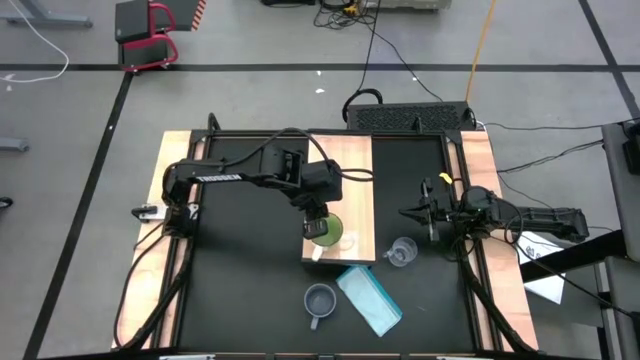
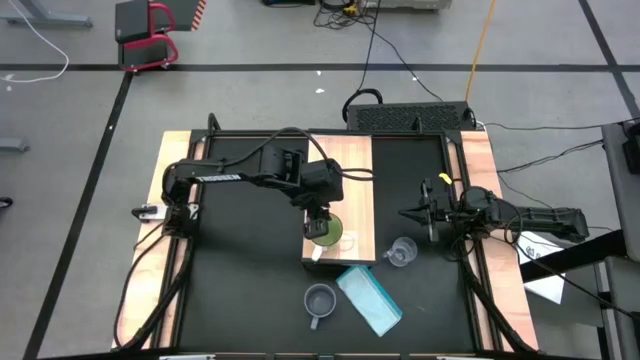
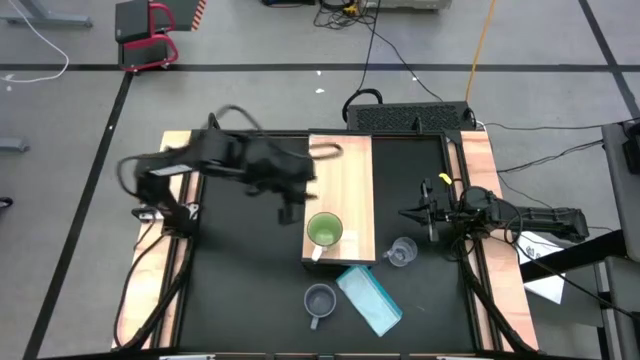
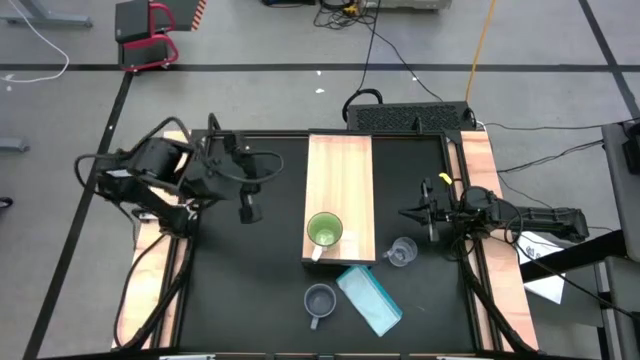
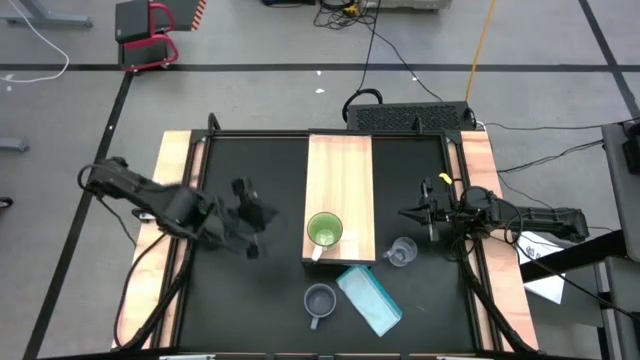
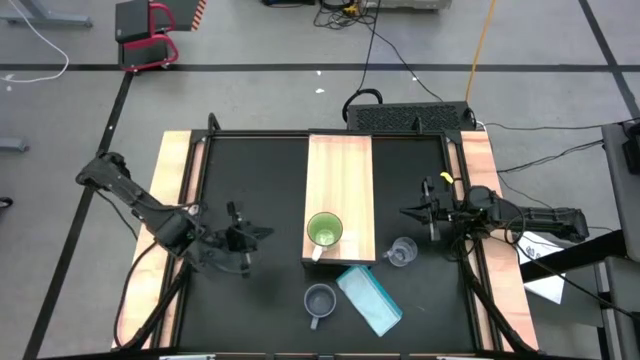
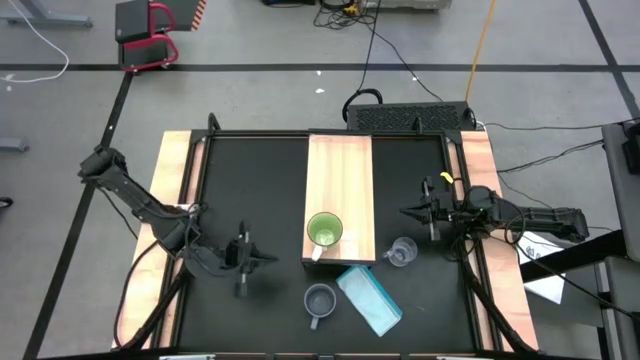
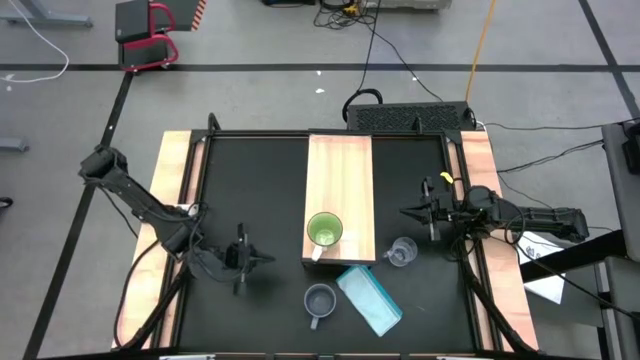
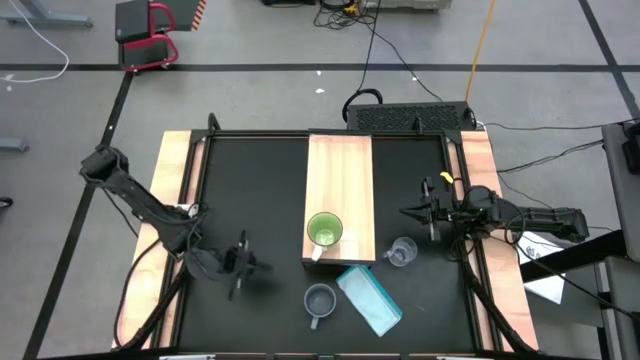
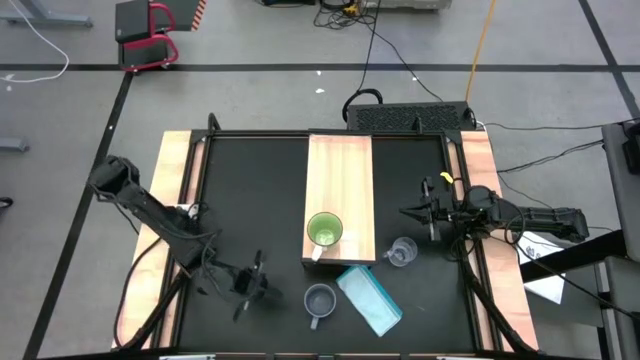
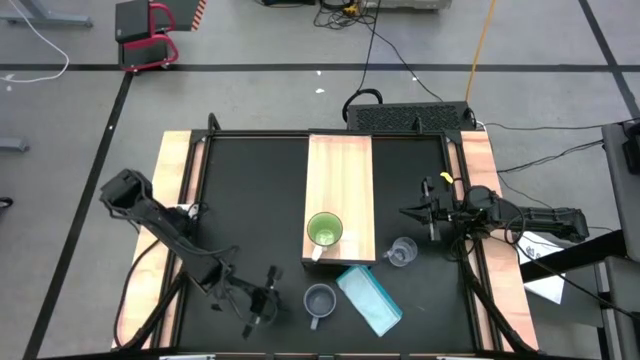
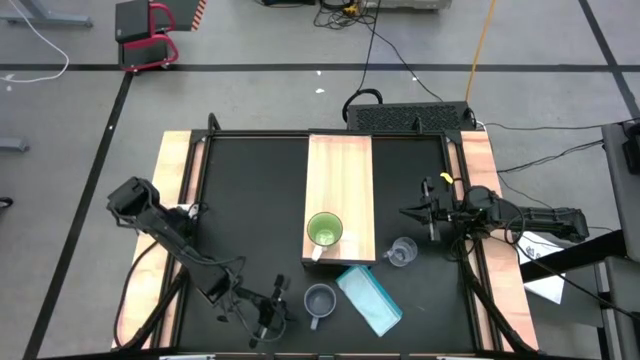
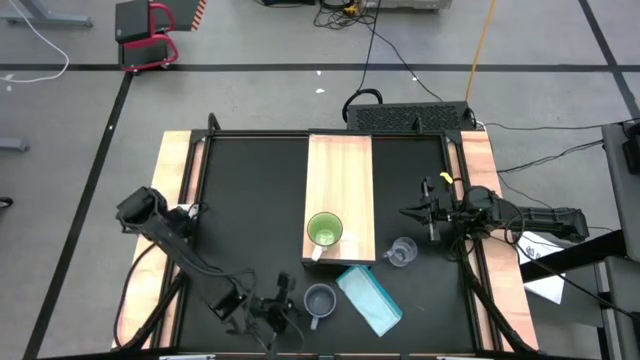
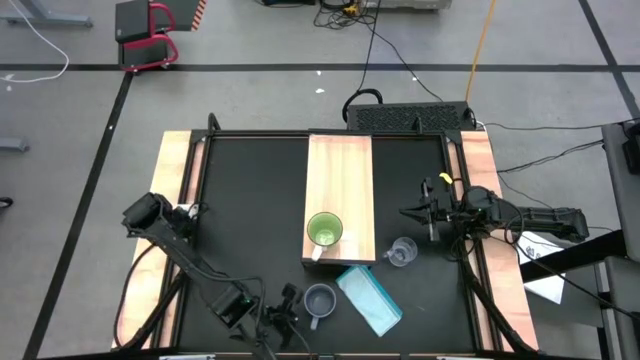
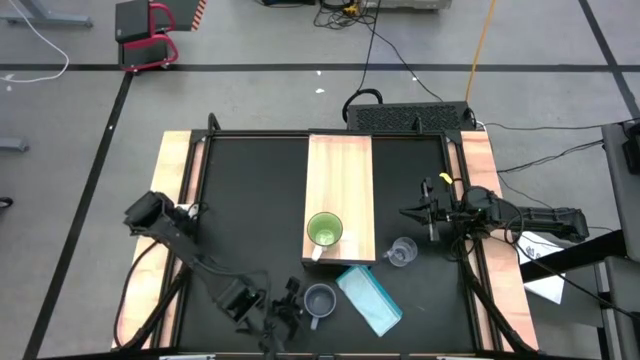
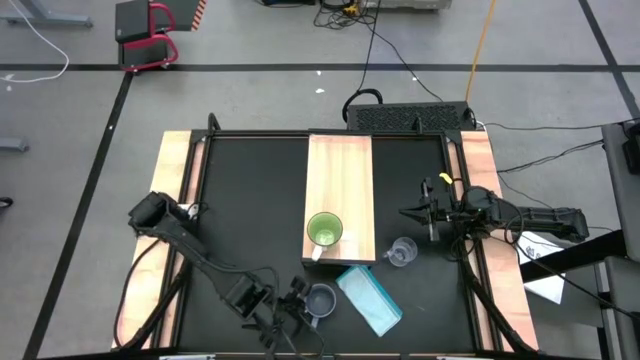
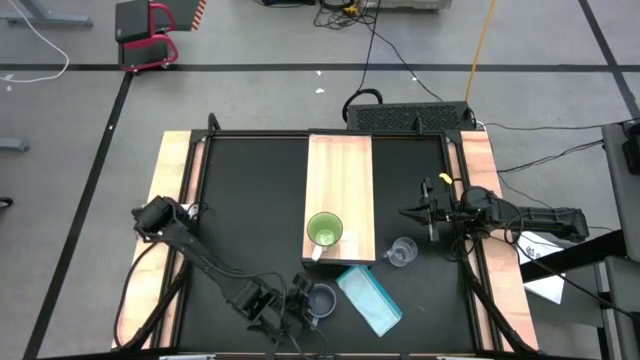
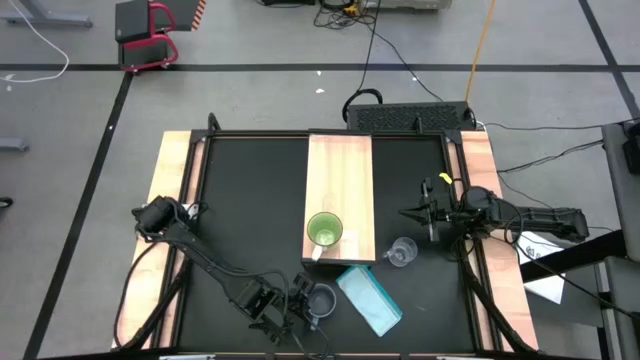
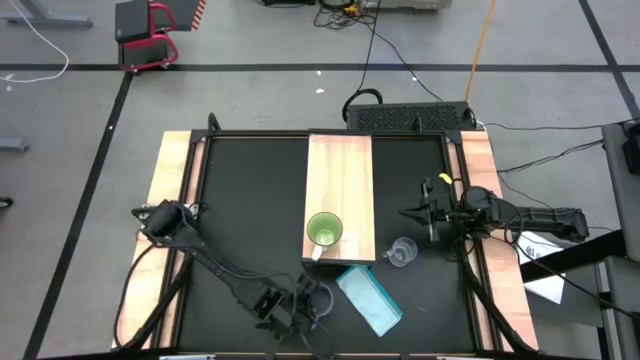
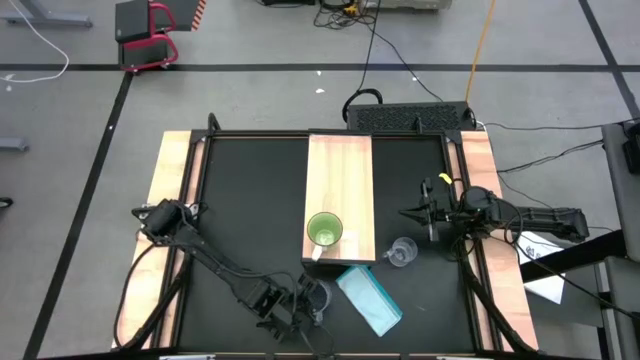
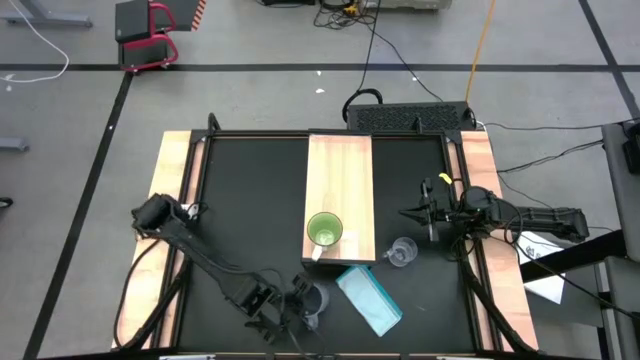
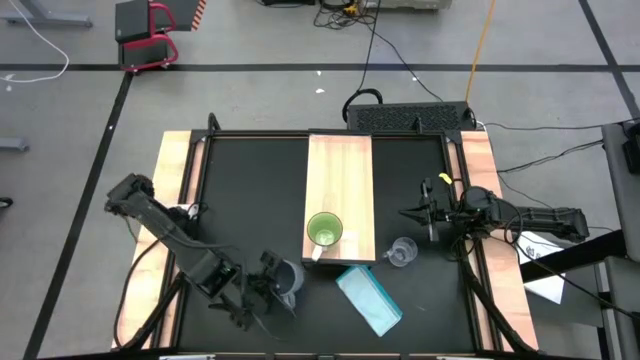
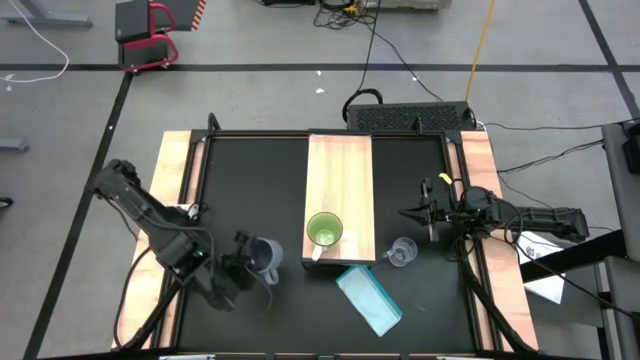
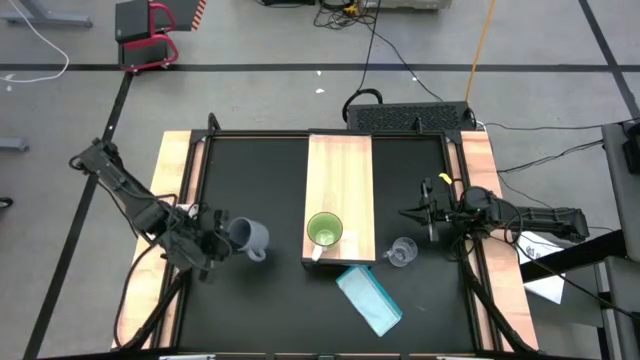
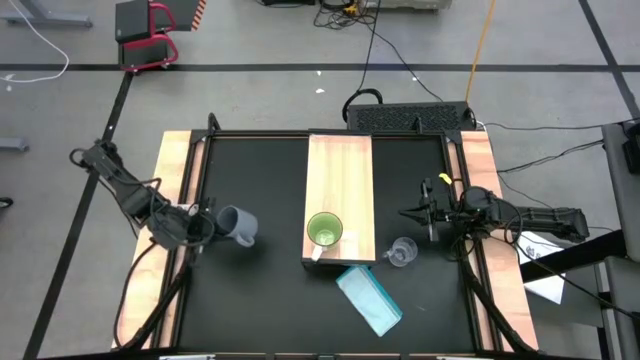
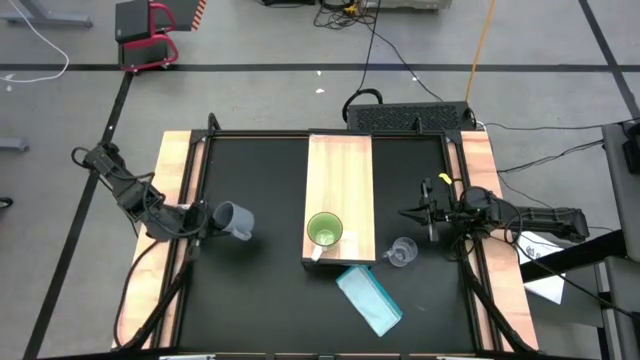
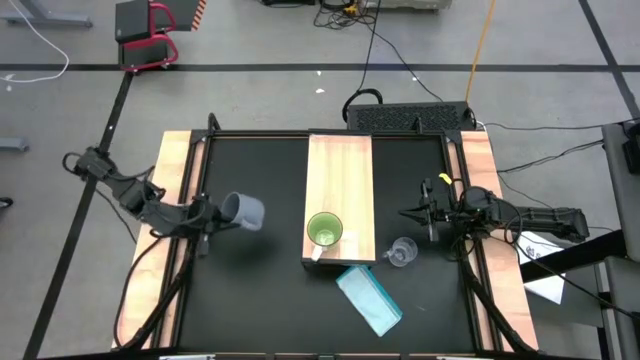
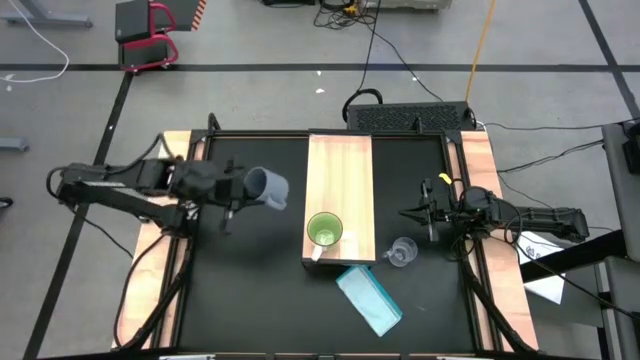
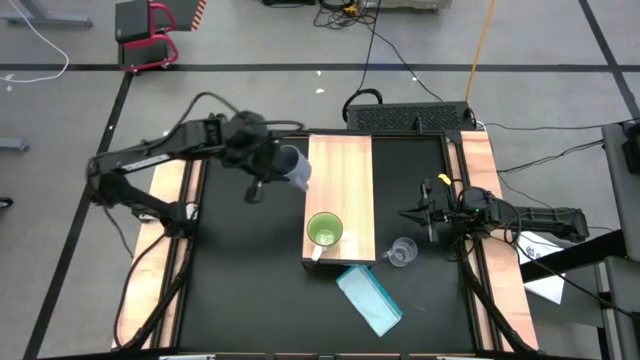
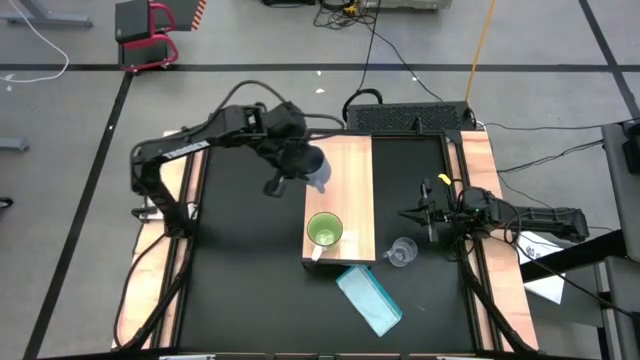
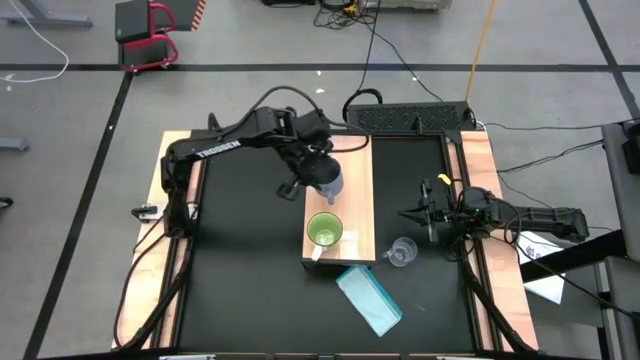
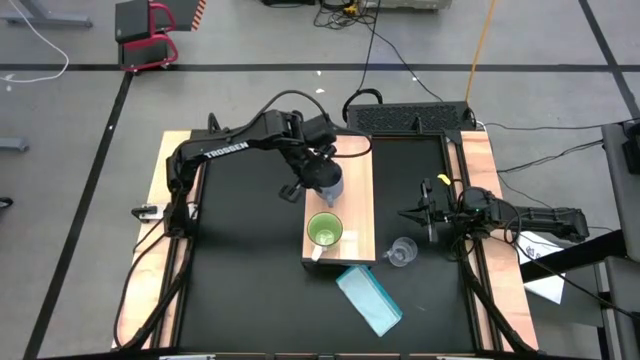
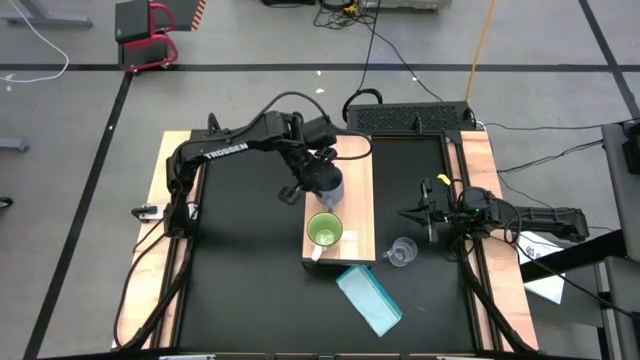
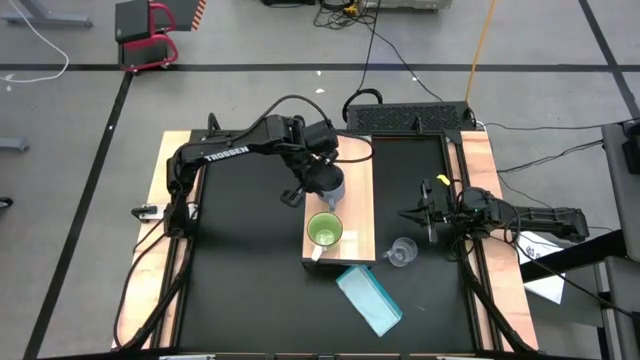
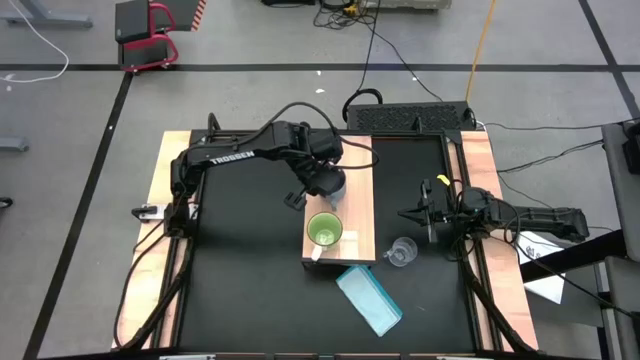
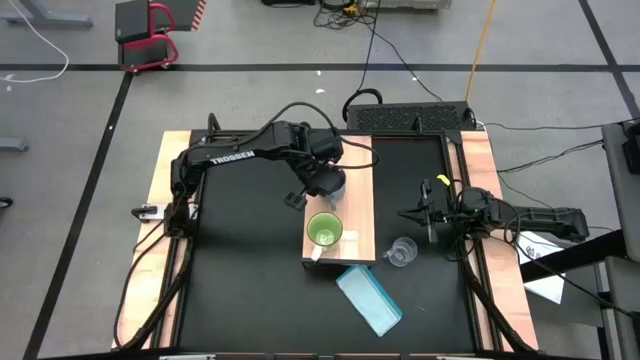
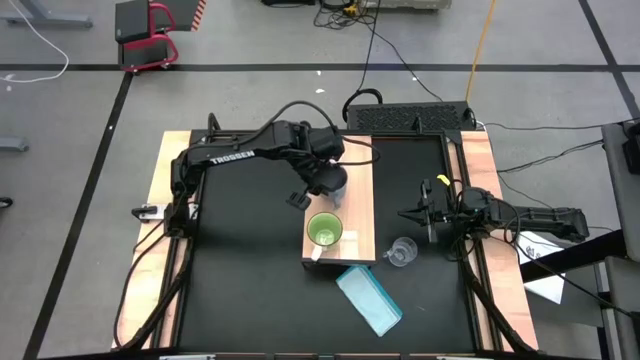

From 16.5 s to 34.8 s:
Task: Stack small to large cups/mugs on shelf
Put the blue mug on the shelf

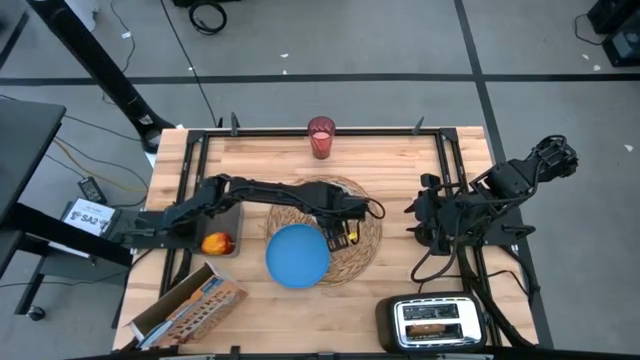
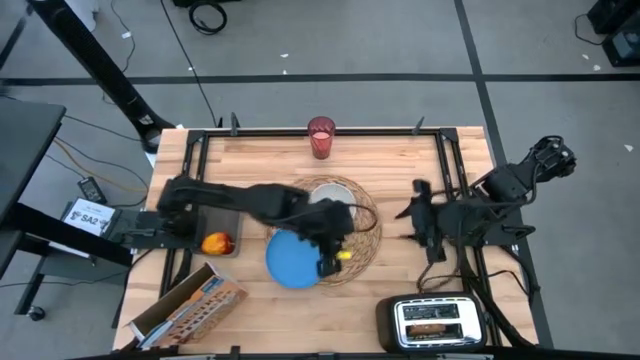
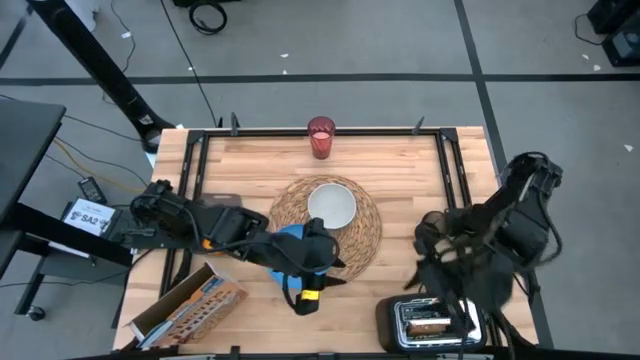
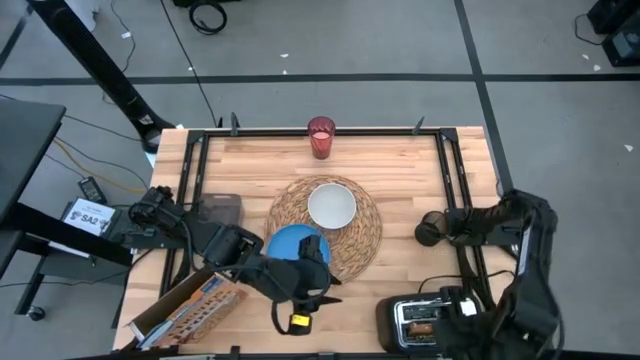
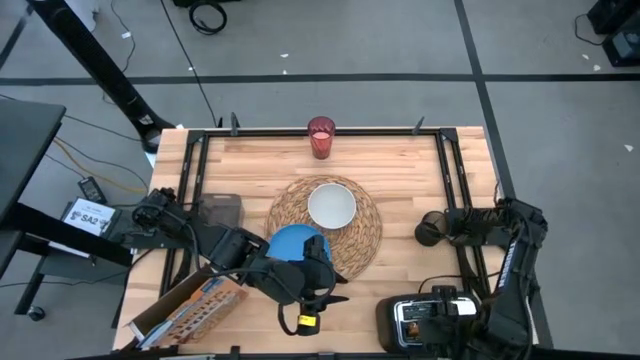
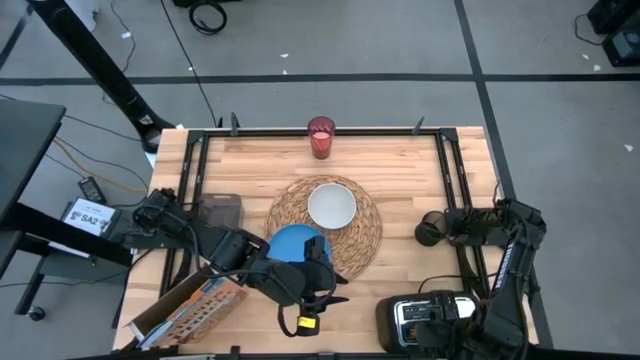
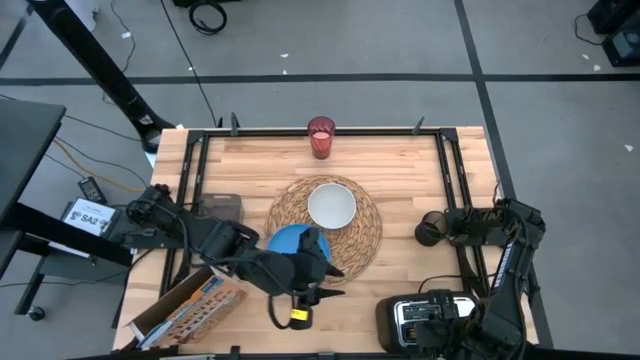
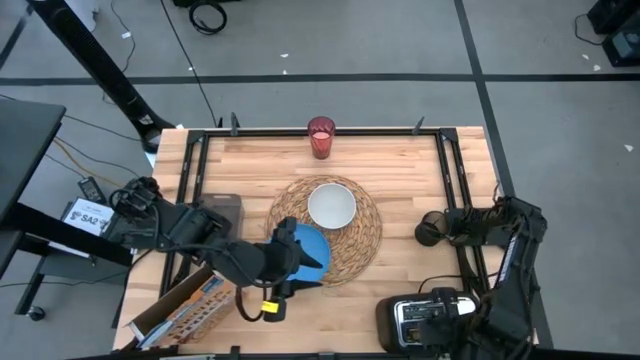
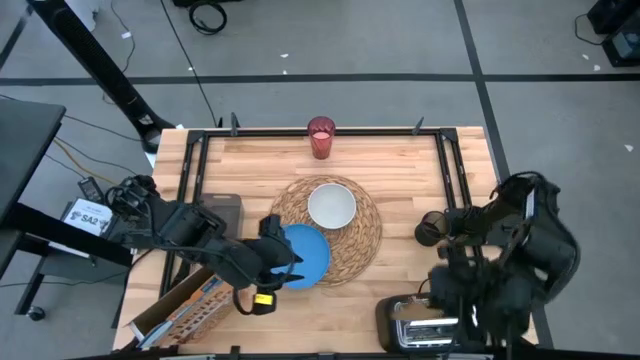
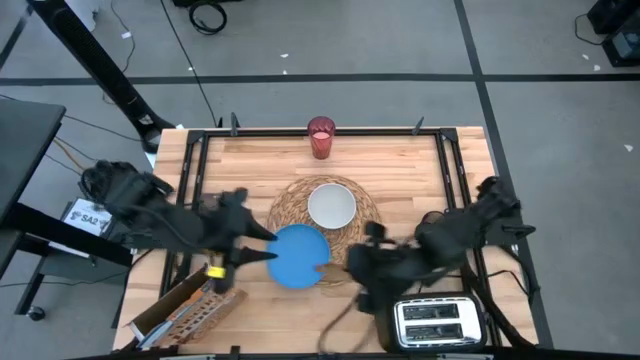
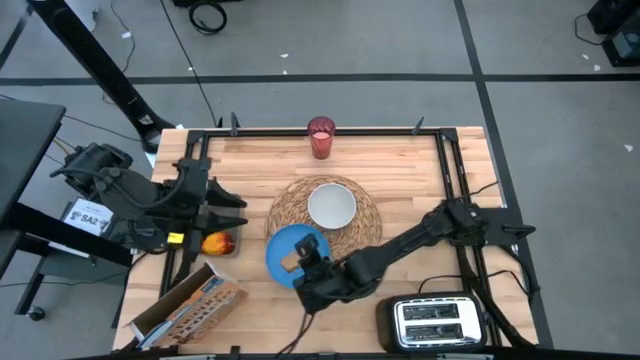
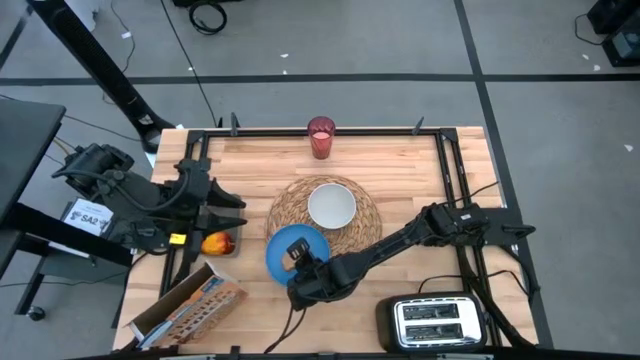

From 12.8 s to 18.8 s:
Task: Arrange a breakfast setting
Put the toast on the plate
